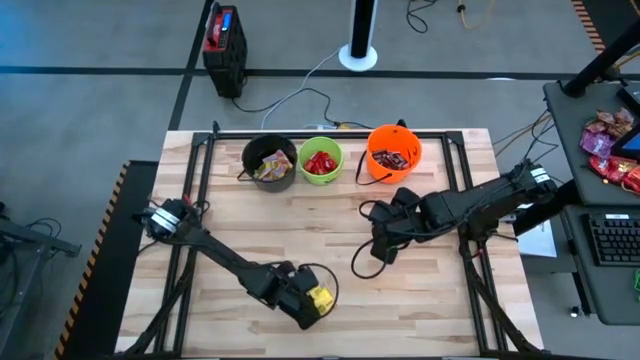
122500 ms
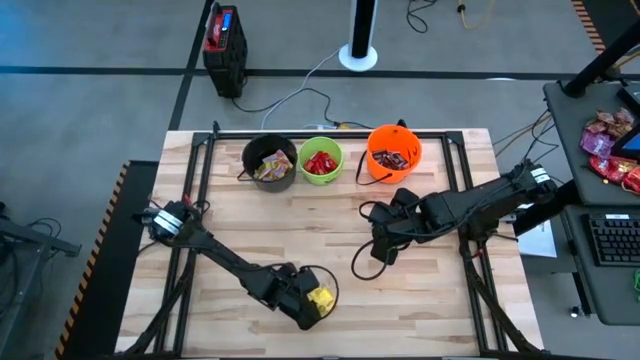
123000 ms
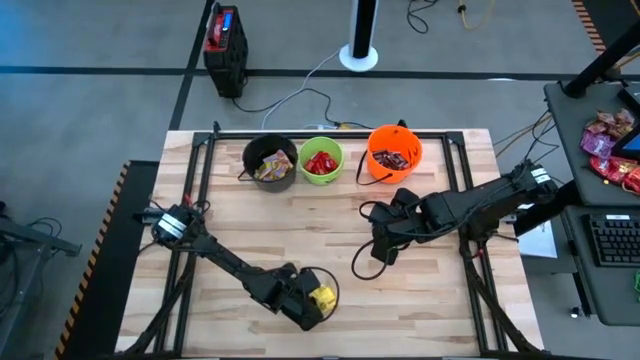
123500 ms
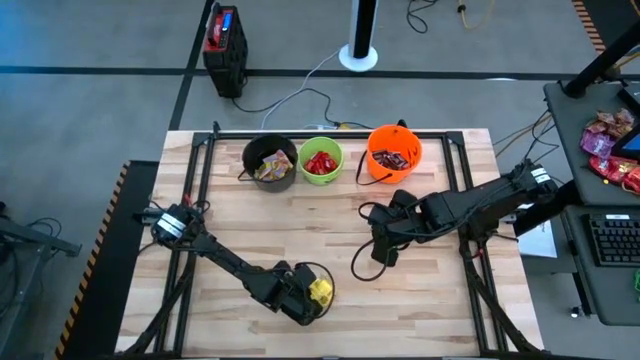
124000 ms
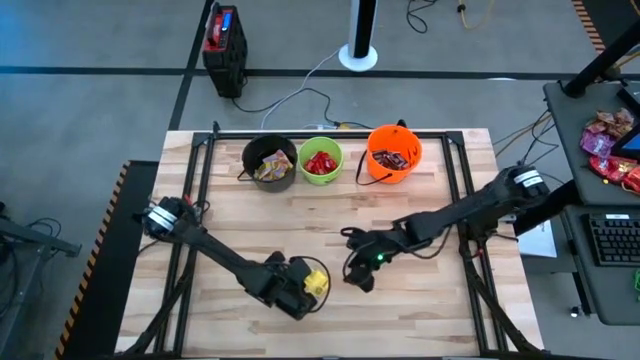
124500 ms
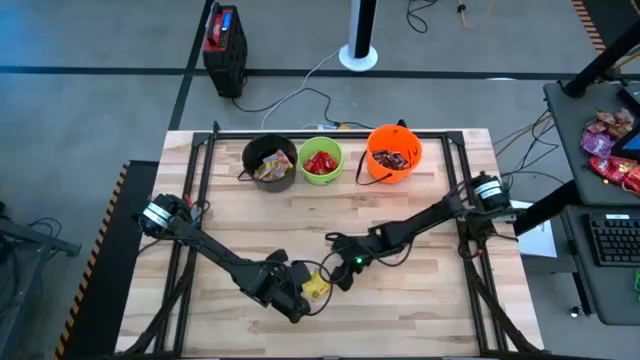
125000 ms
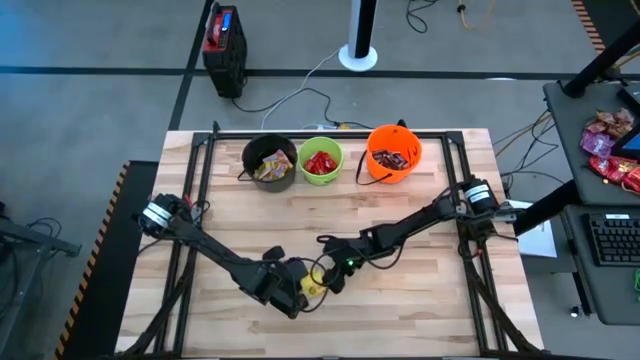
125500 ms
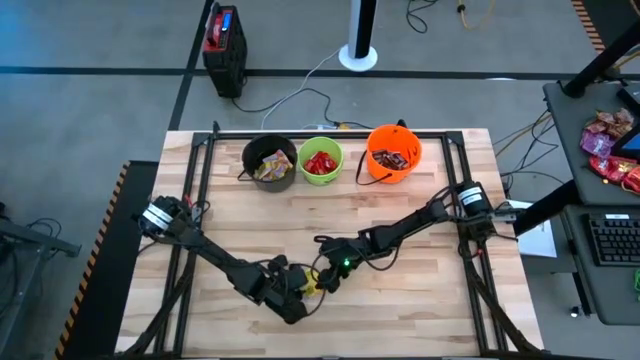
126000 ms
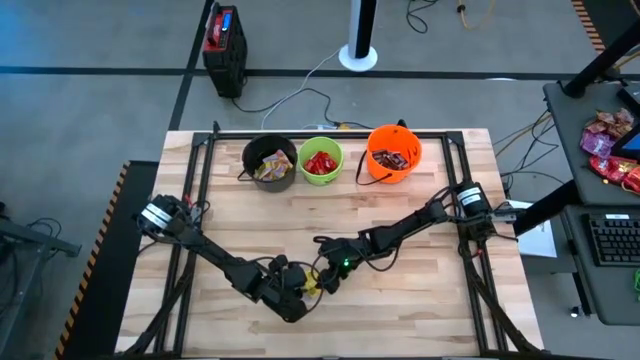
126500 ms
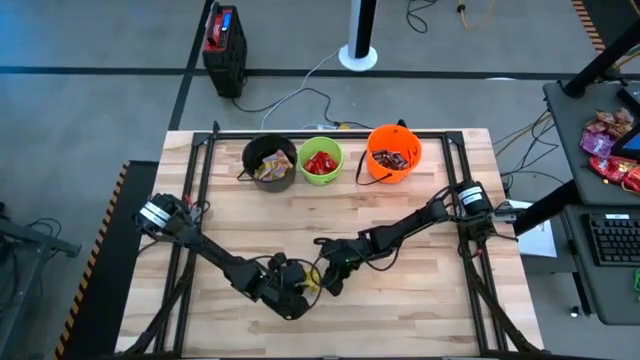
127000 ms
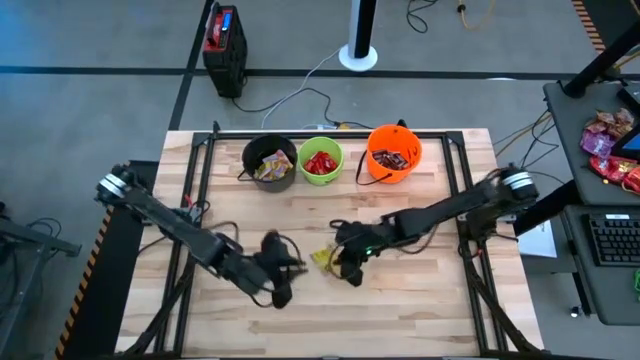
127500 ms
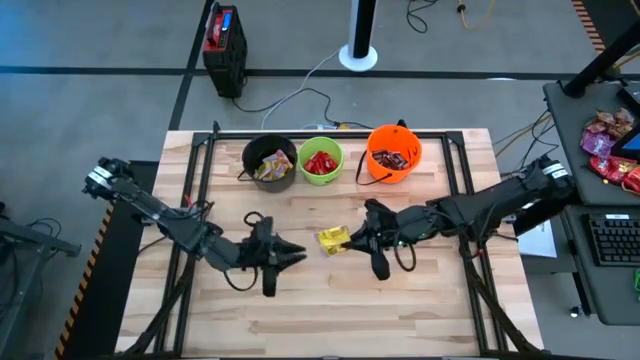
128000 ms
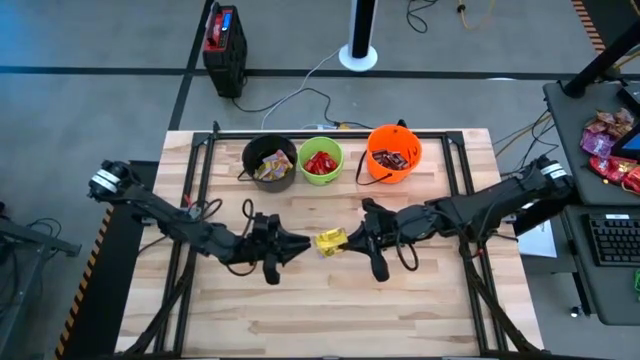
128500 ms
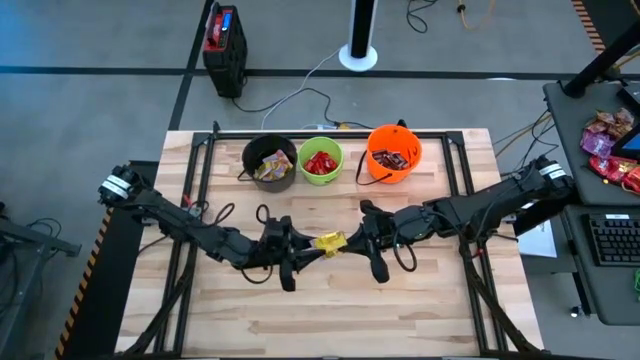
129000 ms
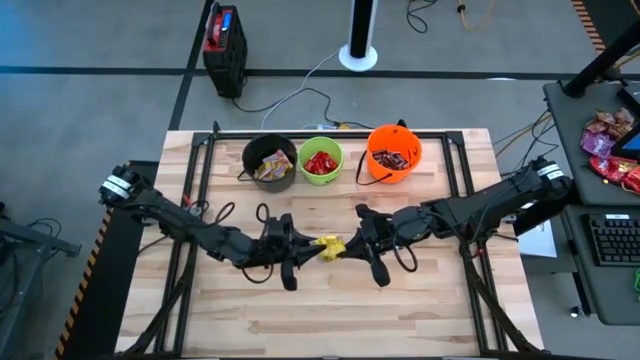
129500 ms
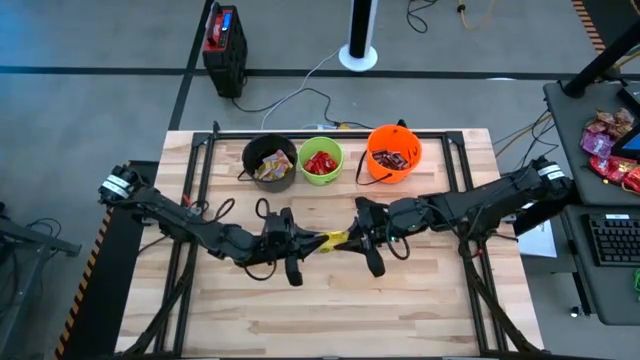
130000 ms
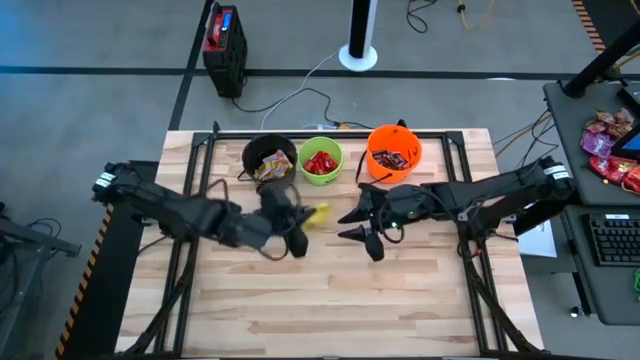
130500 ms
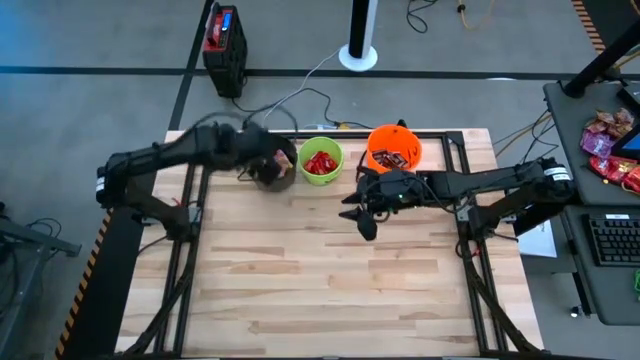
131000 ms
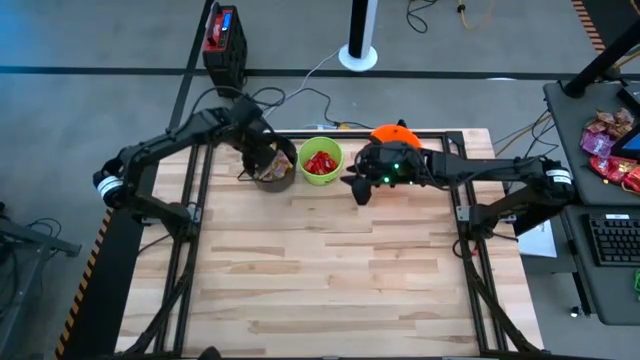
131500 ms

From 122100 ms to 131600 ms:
Task: Sort candy by brand, put in halloween buckets
Put the yellow candy into the black bucket

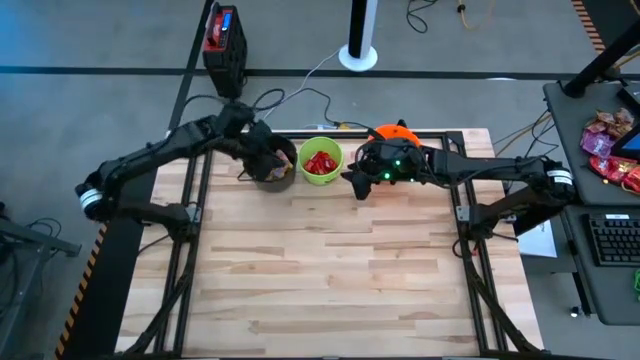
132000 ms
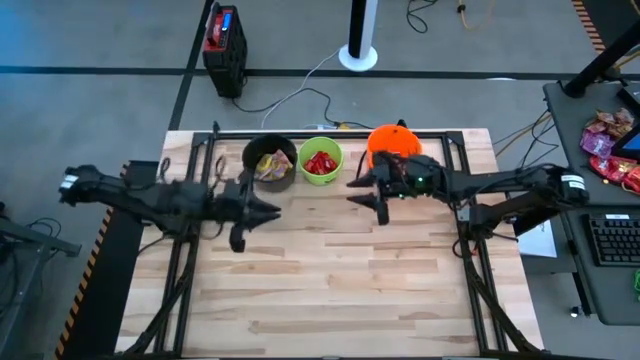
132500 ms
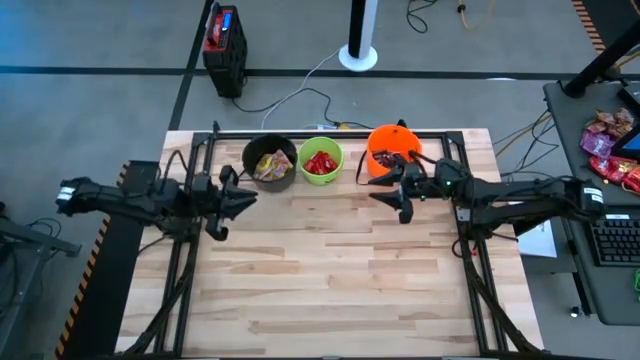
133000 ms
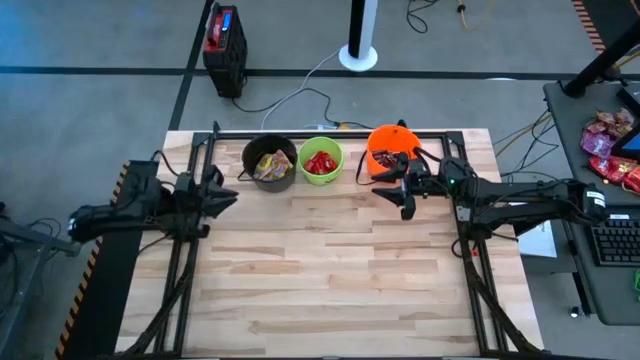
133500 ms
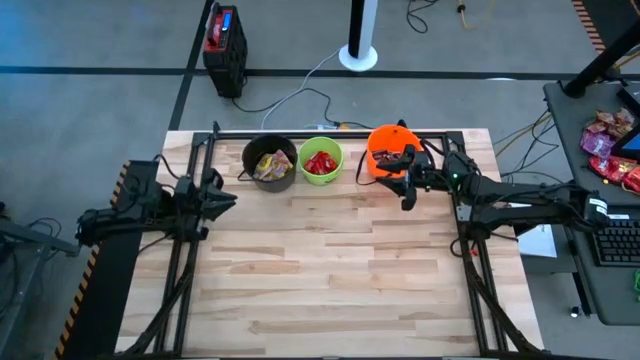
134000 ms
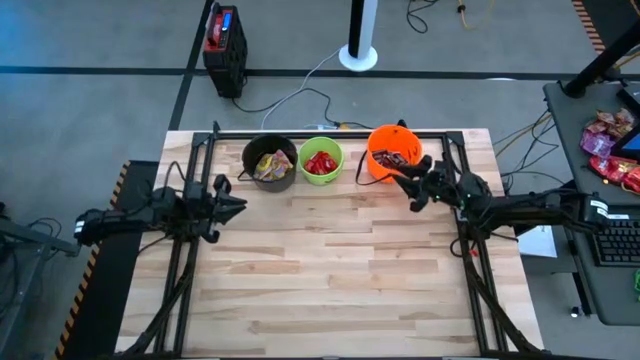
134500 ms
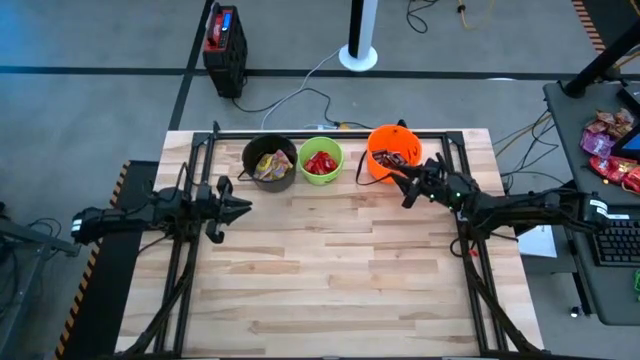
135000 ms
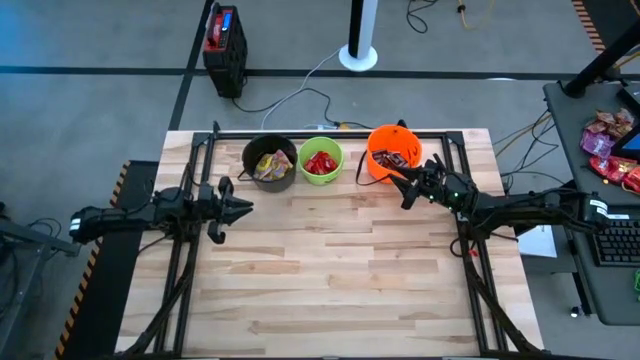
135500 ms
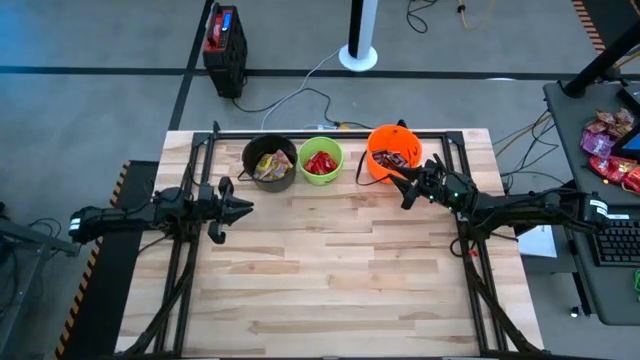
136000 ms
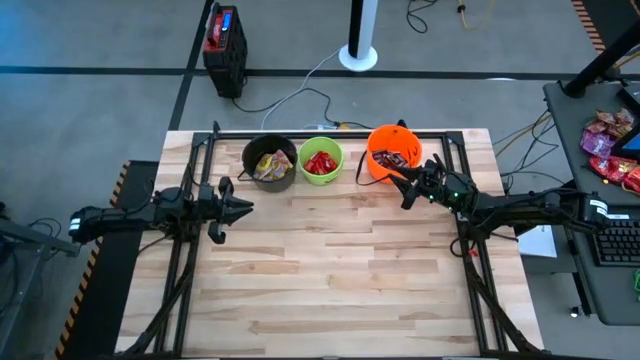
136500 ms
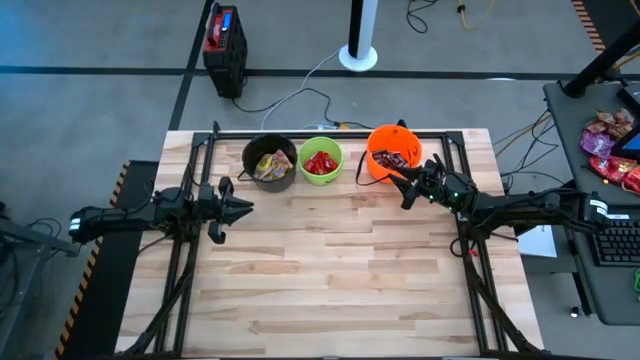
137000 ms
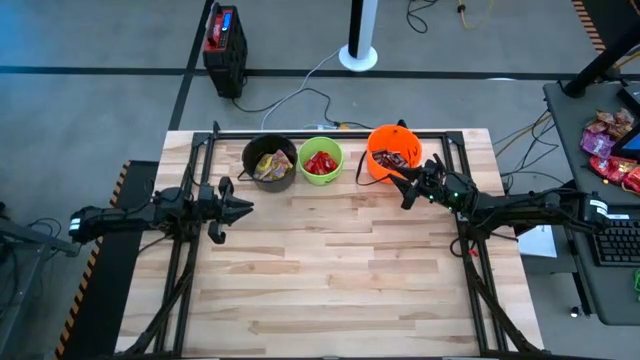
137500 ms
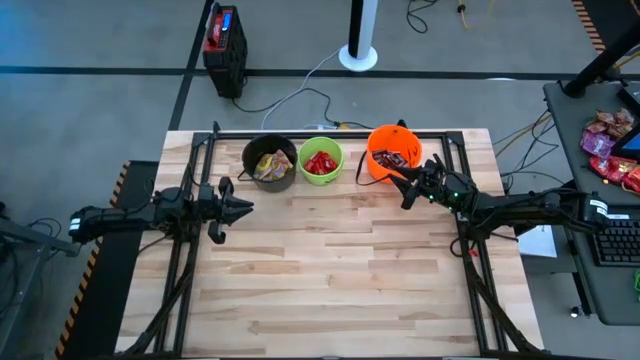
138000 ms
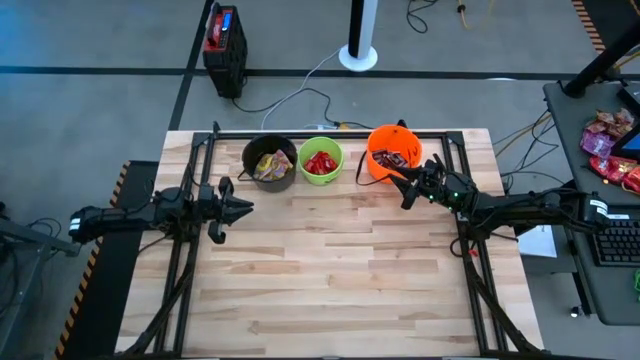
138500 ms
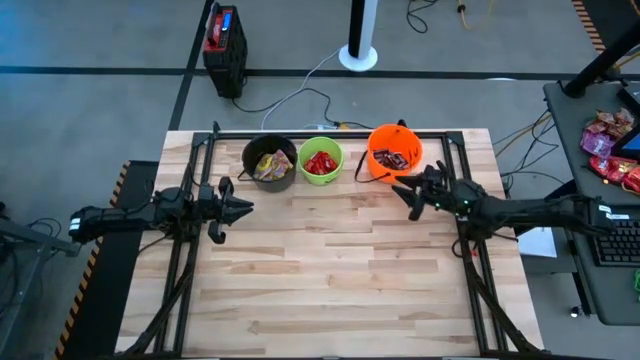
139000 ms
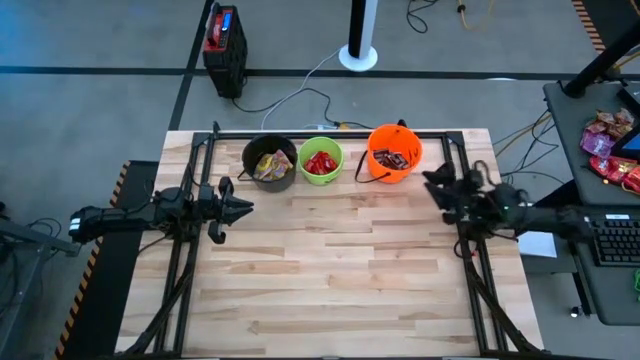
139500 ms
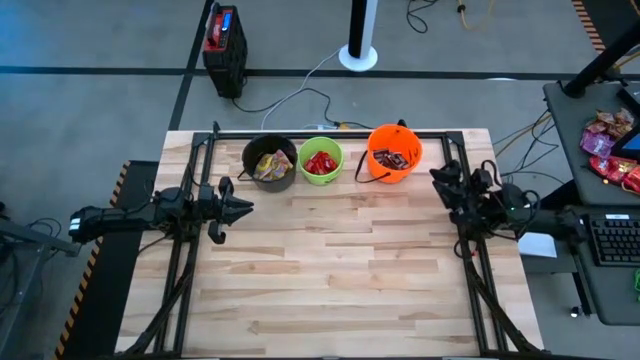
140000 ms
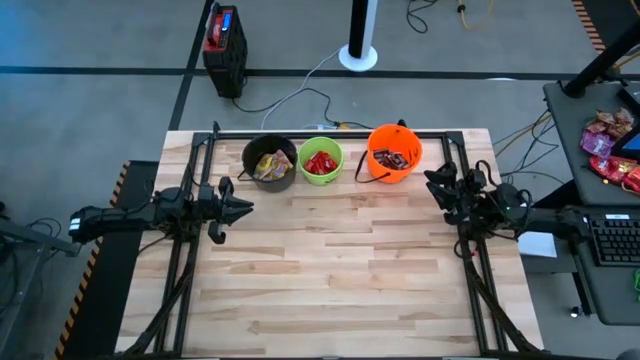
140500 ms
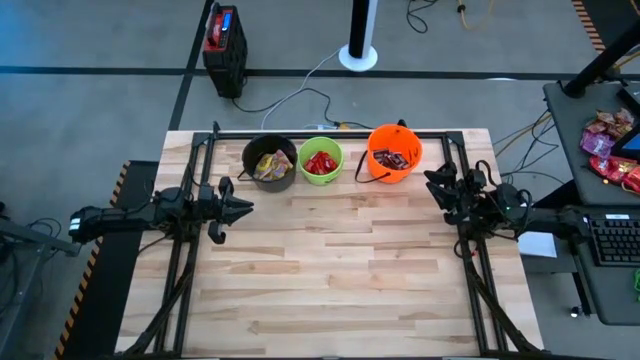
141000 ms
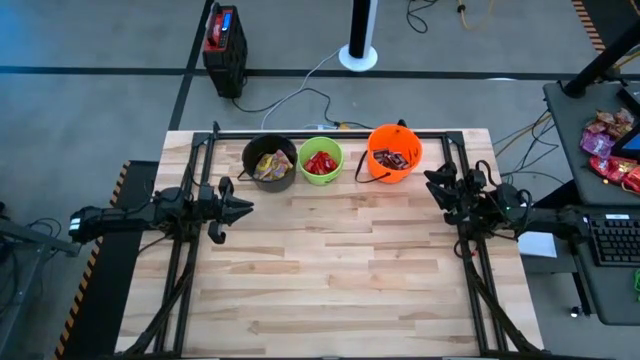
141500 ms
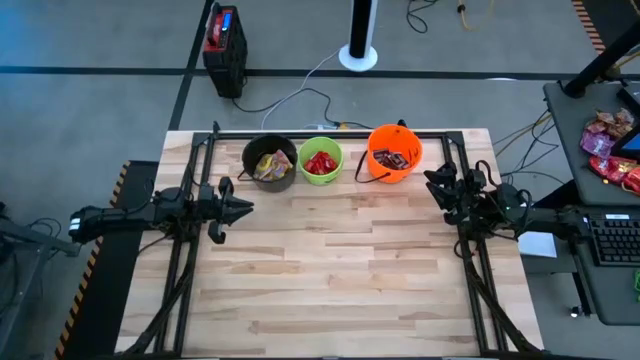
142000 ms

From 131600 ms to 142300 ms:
Return to Home Position

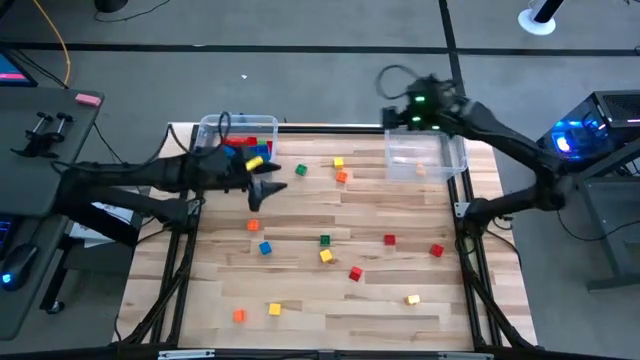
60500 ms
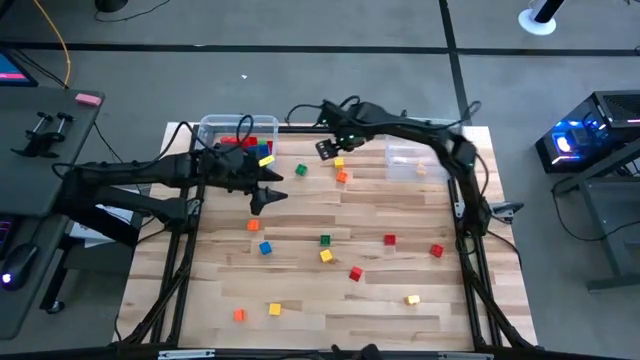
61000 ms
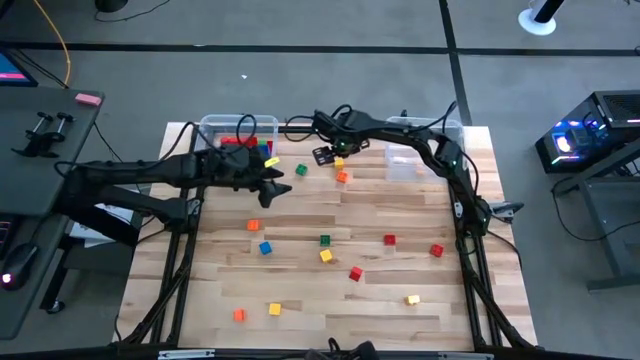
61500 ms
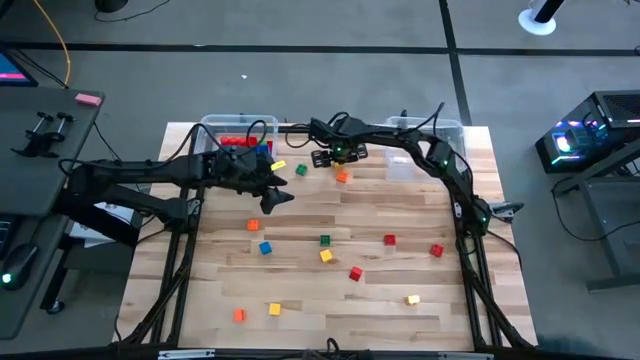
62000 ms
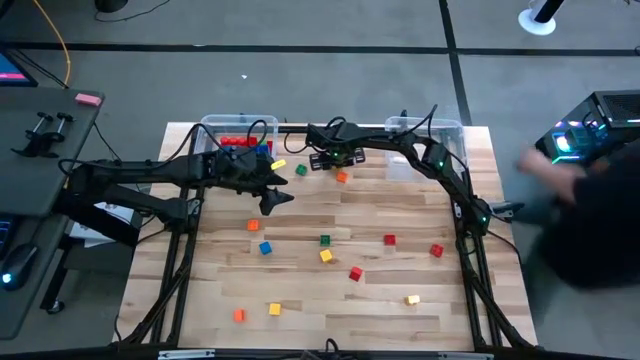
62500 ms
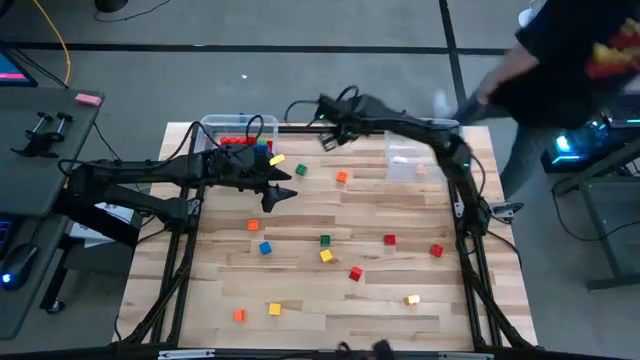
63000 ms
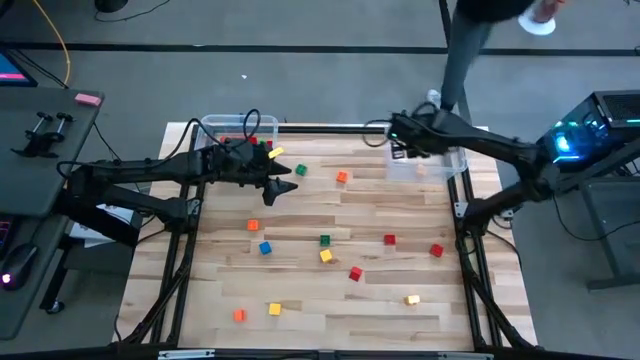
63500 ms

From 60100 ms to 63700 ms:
Task: Sort blocks by size
Put the small block into the right transparent bin
